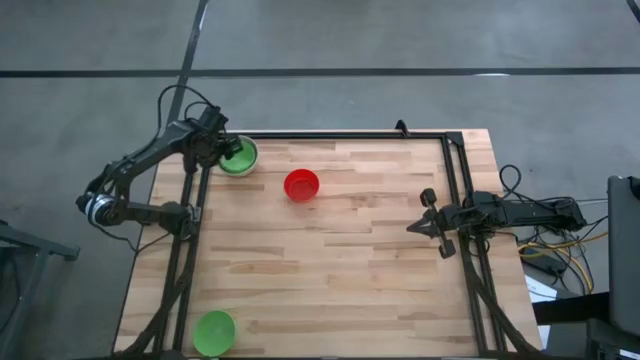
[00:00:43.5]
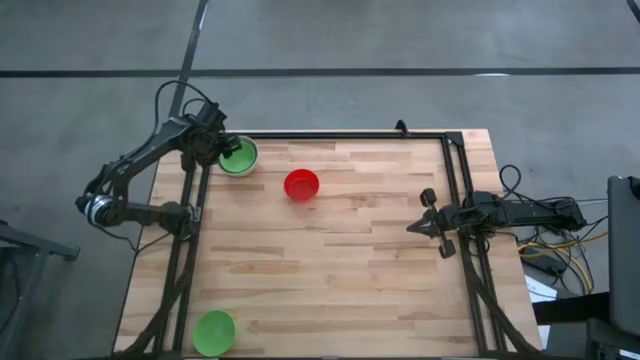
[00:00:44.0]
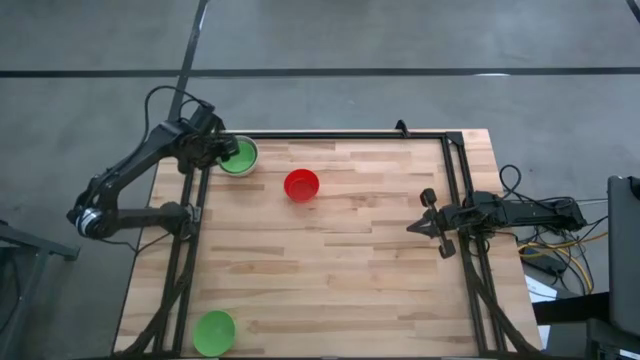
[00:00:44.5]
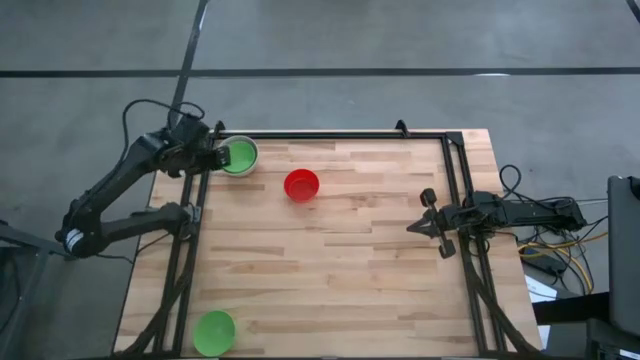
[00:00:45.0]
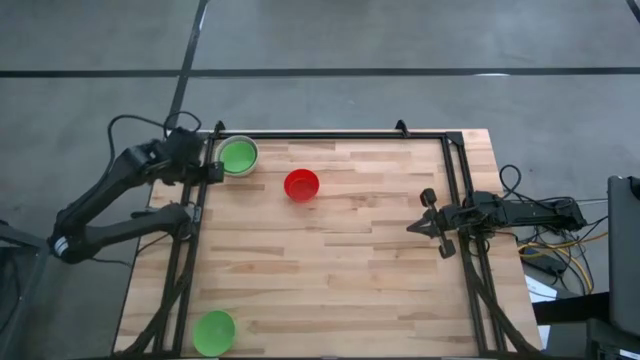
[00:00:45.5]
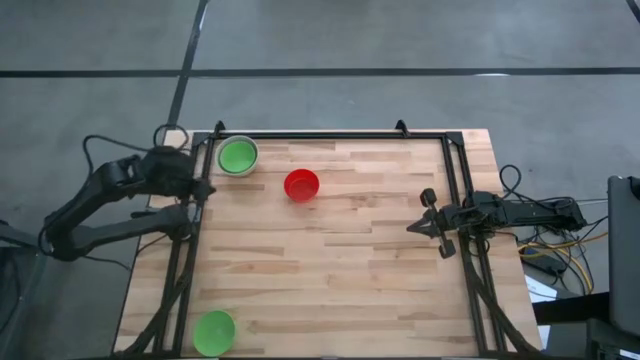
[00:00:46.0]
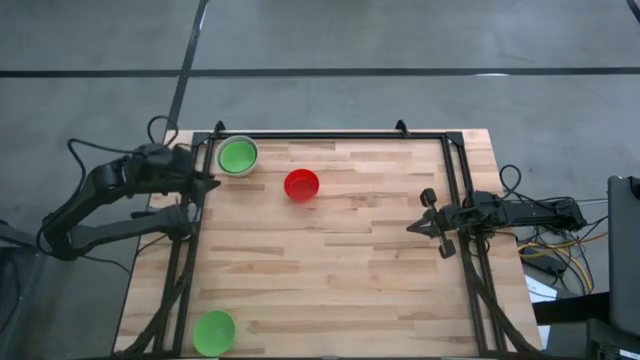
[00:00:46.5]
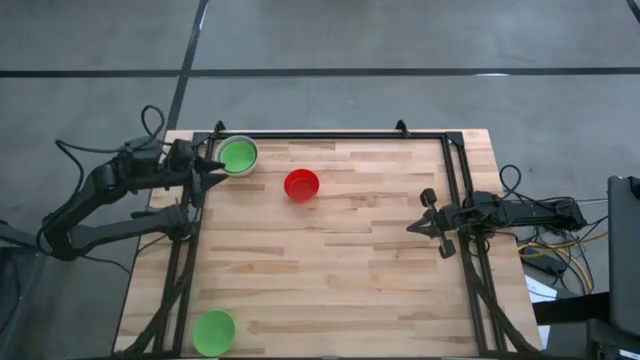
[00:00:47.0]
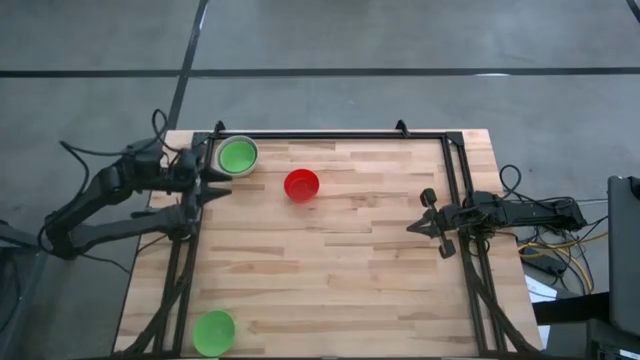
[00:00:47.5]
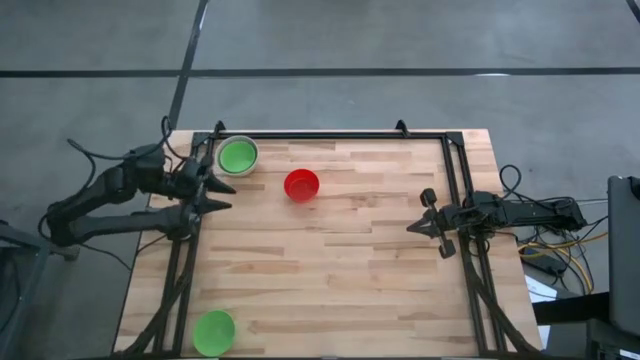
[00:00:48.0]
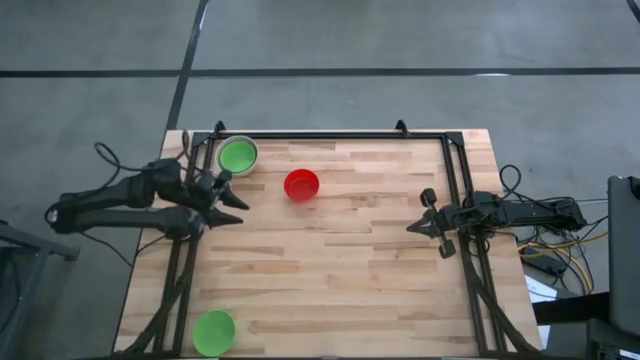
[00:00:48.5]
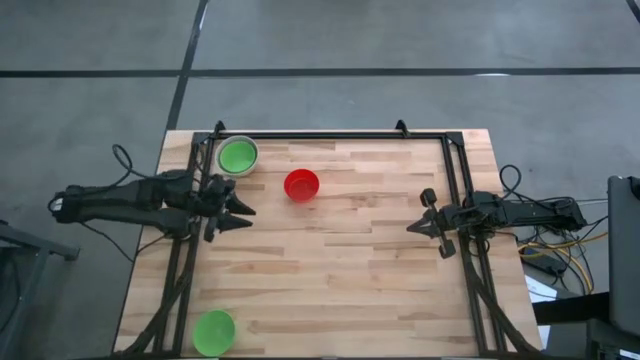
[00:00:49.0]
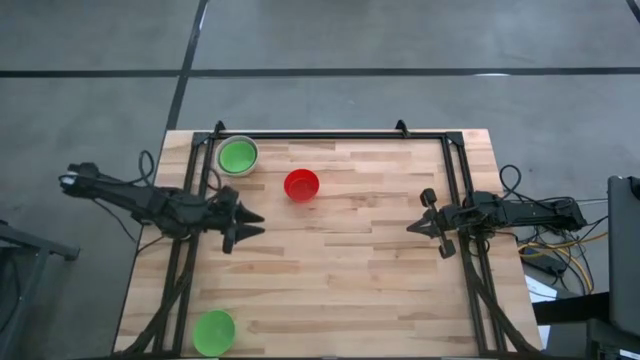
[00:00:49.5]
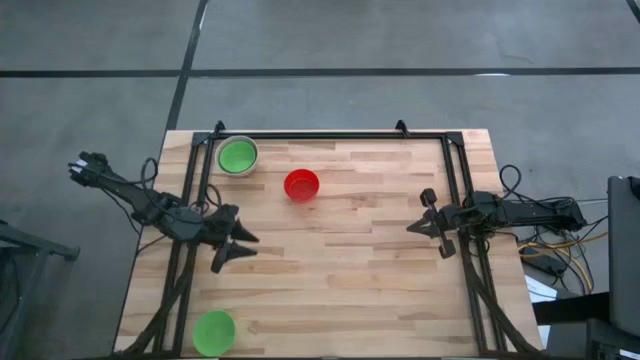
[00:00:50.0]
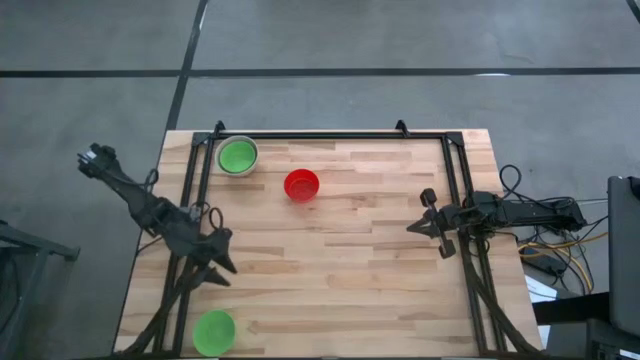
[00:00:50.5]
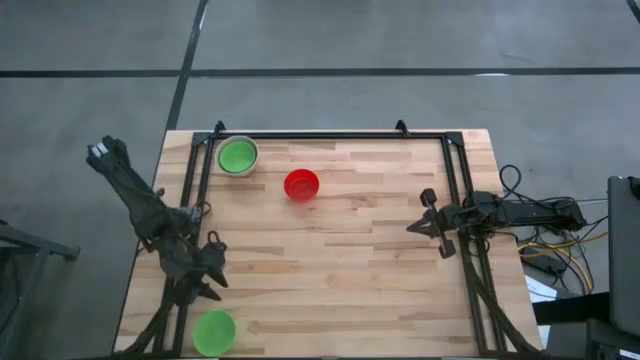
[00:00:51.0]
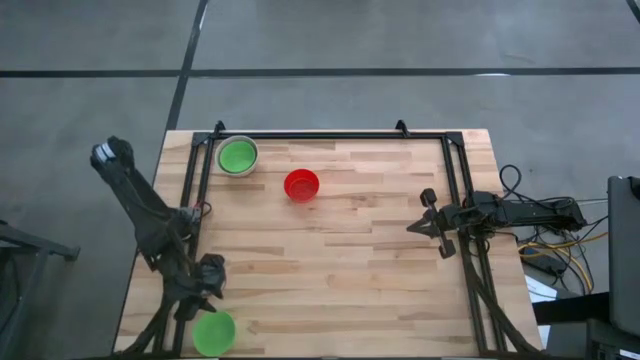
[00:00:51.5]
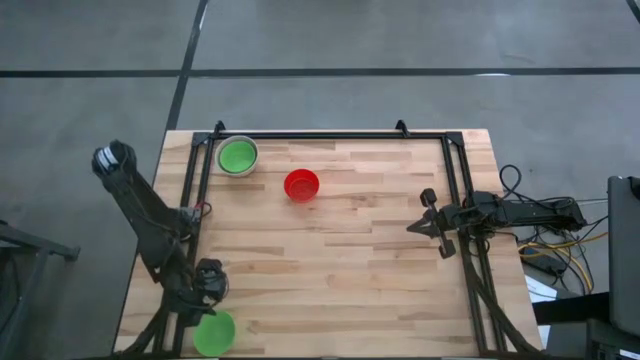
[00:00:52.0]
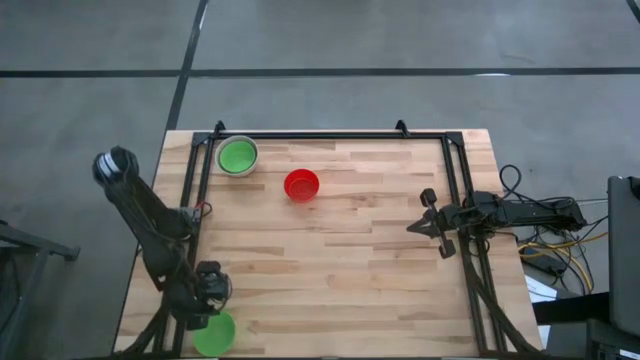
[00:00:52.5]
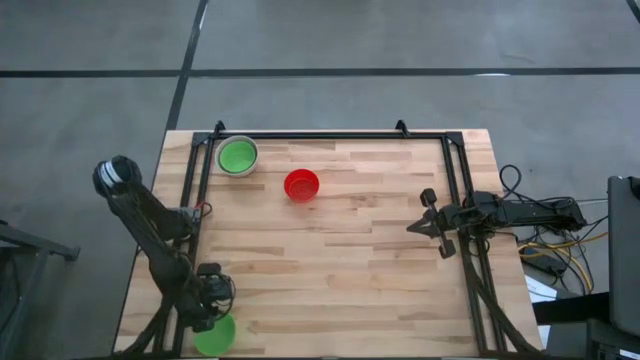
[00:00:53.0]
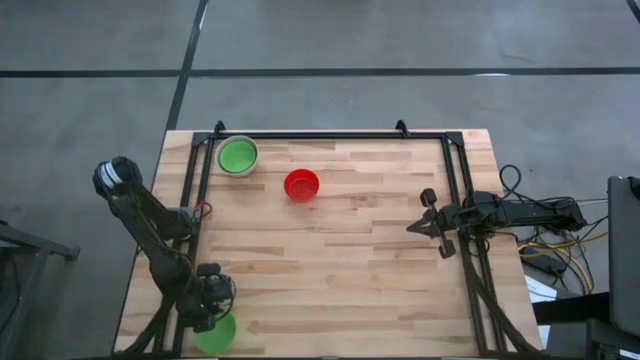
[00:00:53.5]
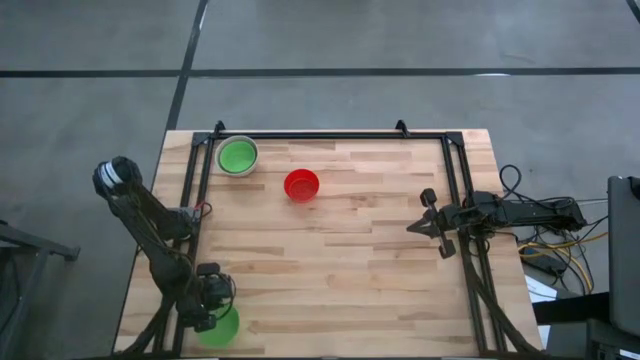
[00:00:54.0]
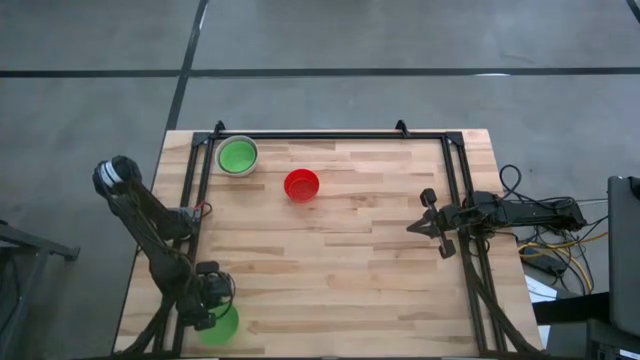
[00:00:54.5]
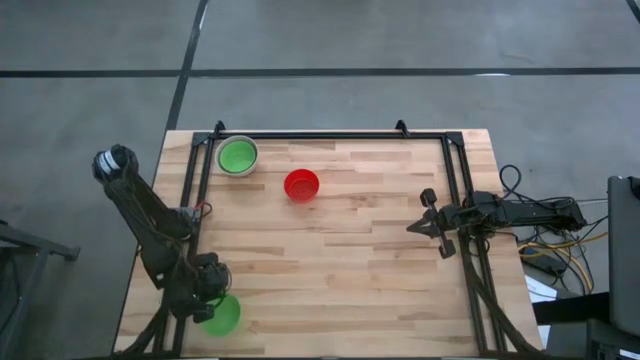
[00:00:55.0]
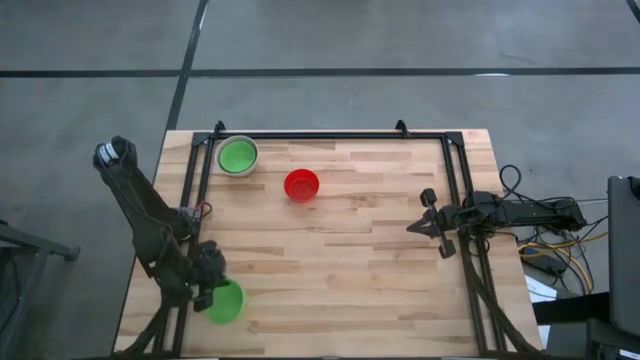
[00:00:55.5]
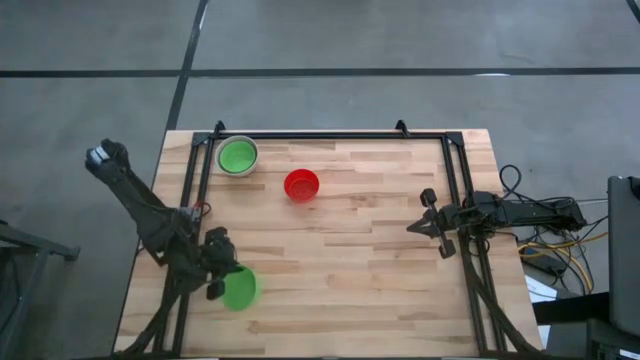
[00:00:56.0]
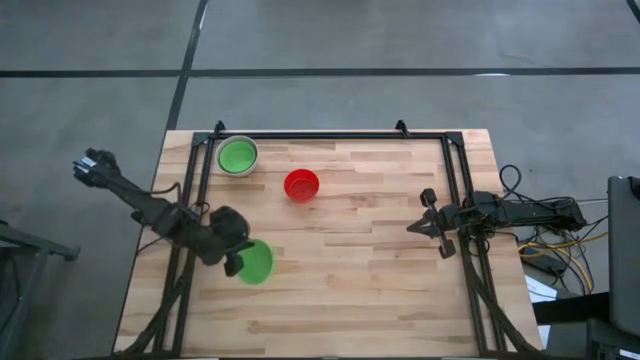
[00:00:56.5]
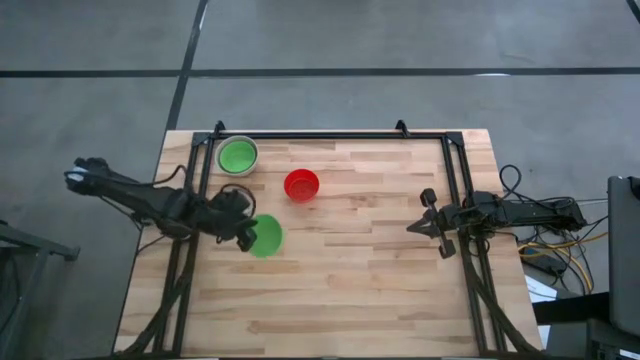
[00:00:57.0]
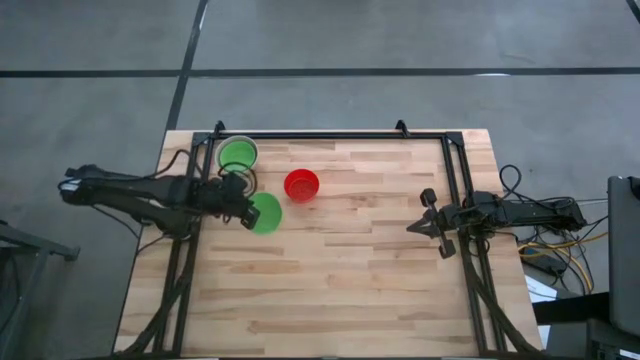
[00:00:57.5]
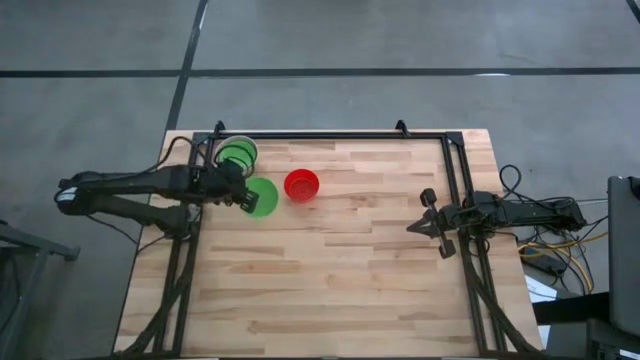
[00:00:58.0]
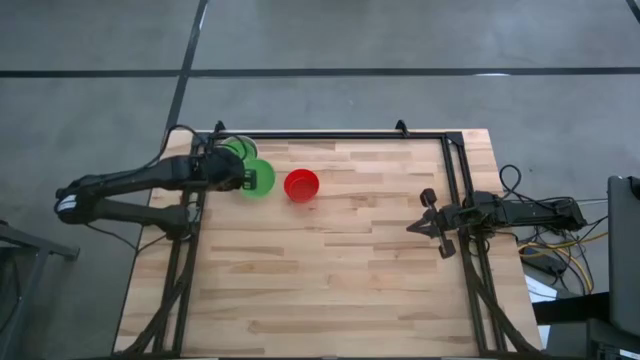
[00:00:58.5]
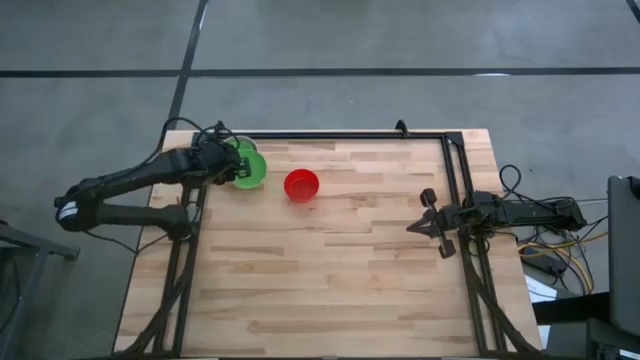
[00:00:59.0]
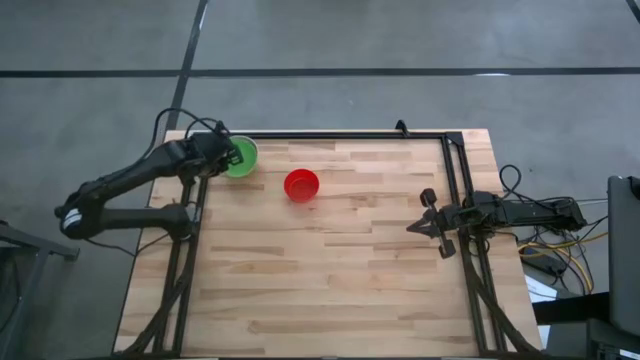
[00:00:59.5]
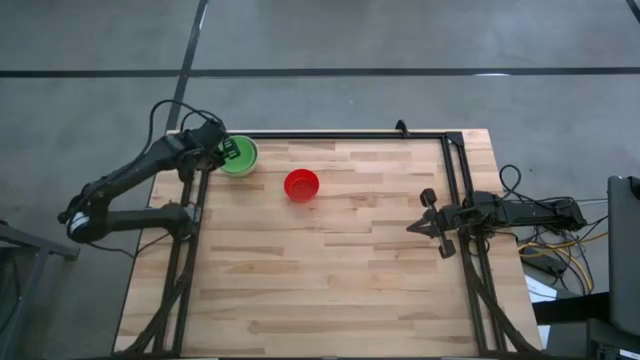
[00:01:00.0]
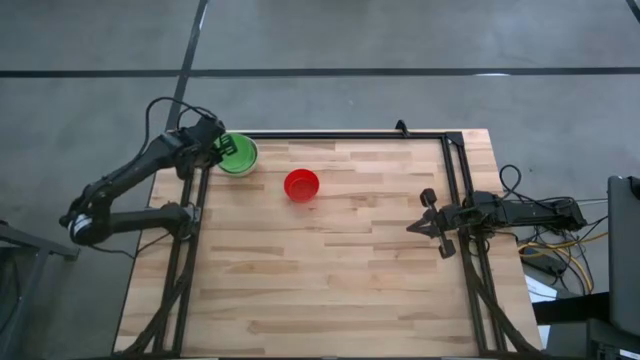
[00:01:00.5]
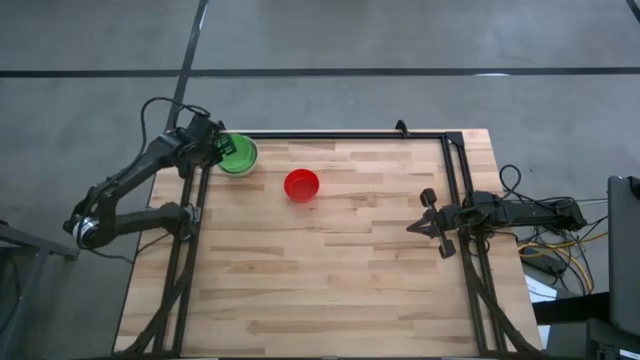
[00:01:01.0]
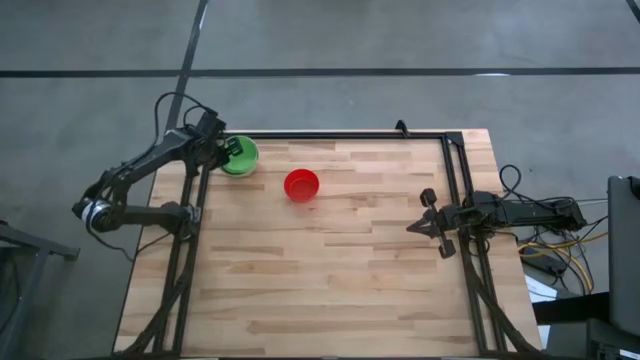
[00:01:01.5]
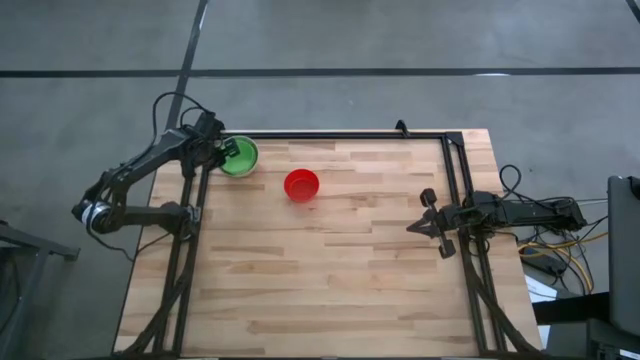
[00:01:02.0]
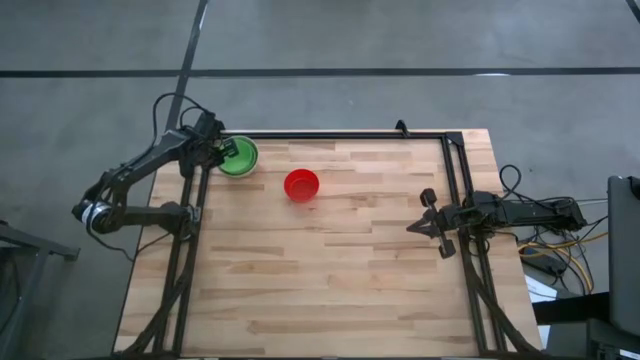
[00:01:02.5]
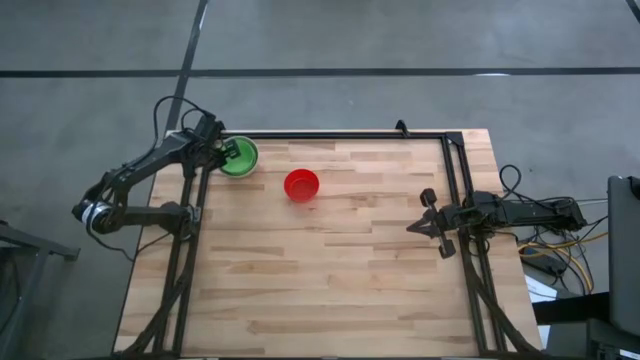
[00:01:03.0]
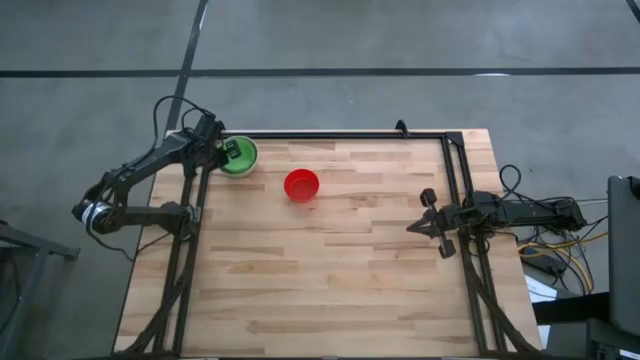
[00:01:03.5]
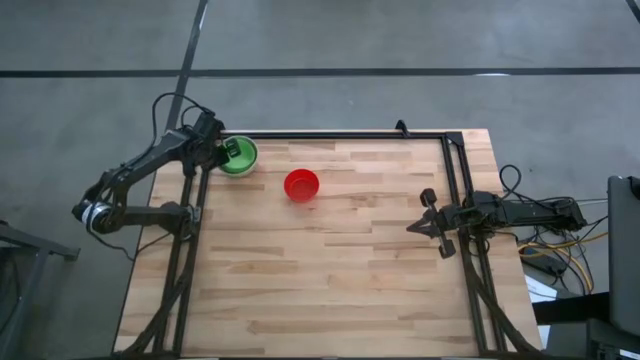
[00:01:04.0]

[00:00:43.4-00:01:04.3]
Stack the green bowl on the stacked bowls
